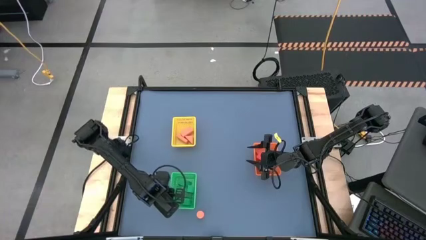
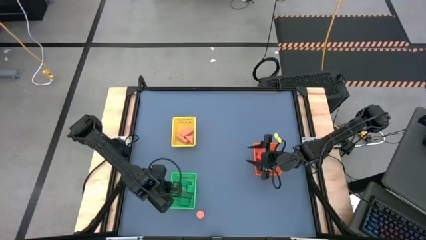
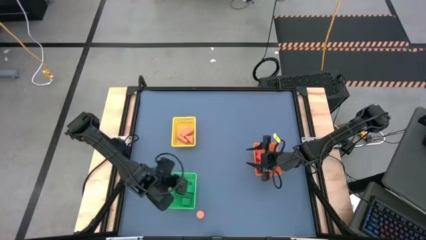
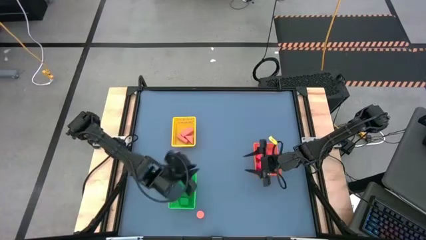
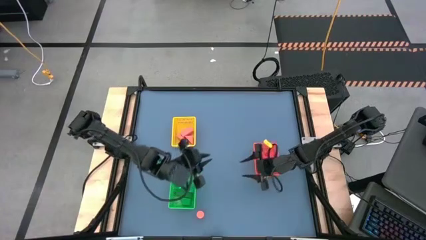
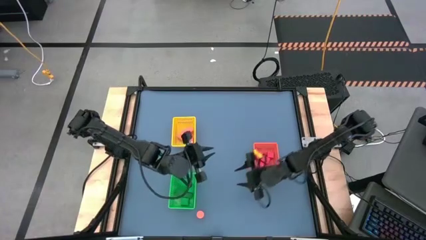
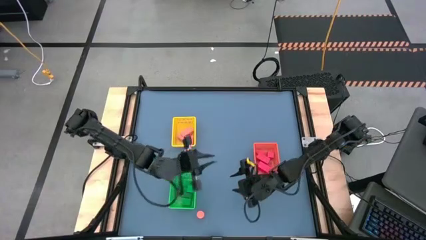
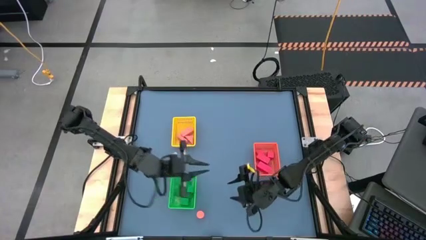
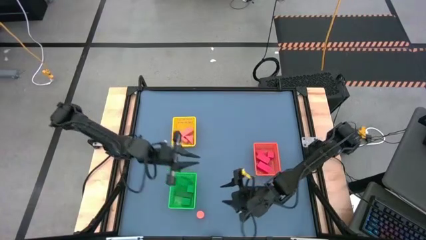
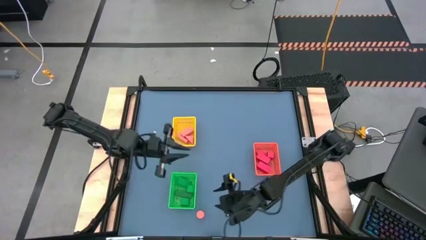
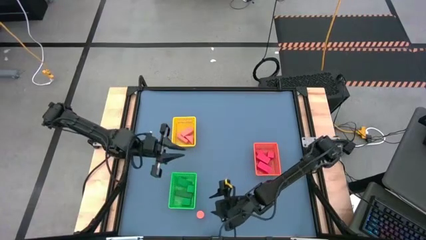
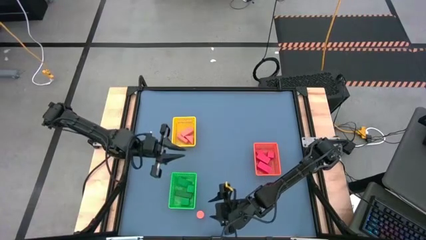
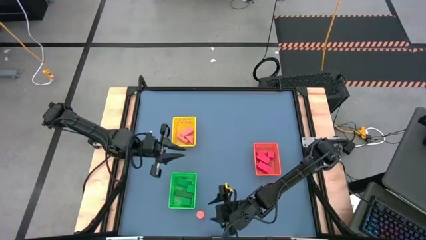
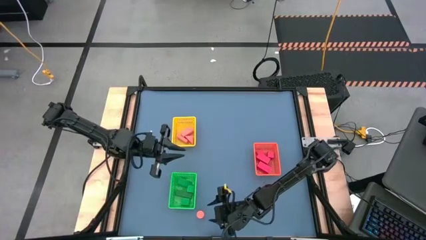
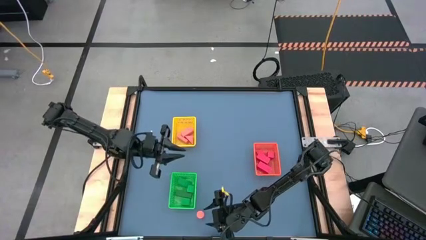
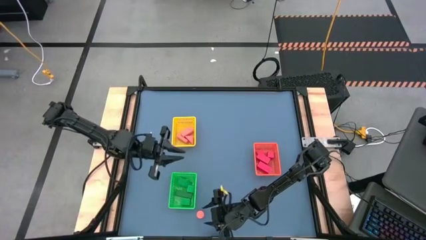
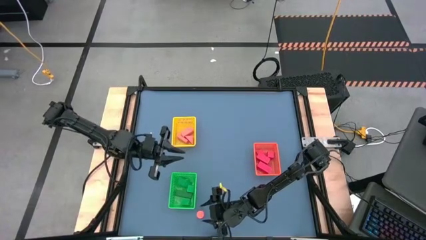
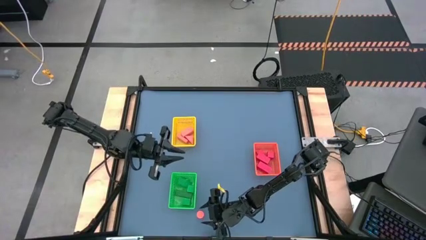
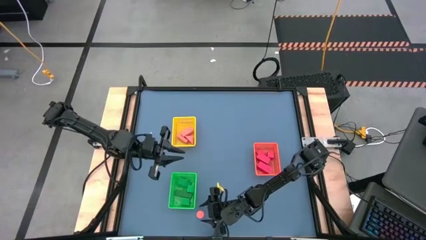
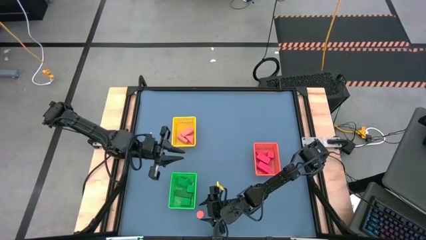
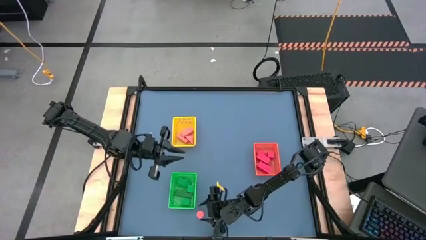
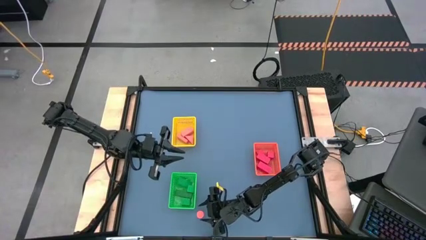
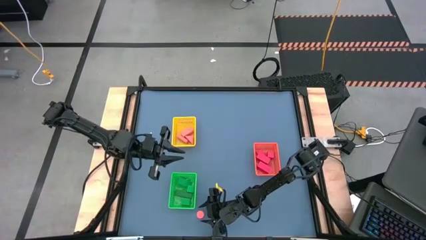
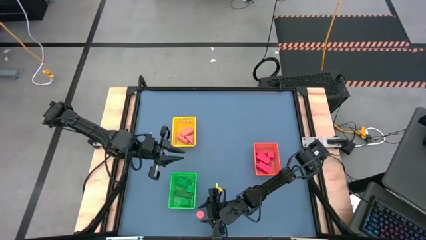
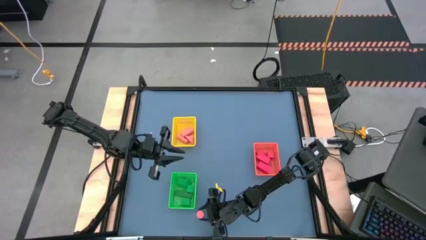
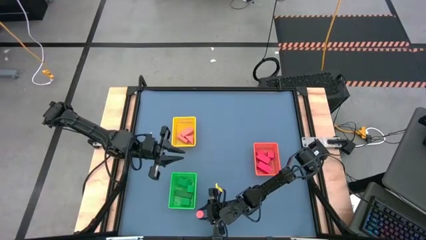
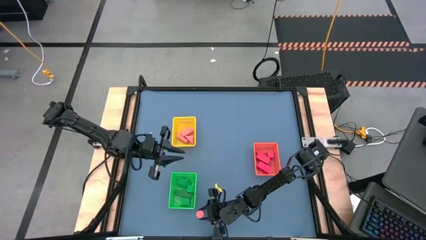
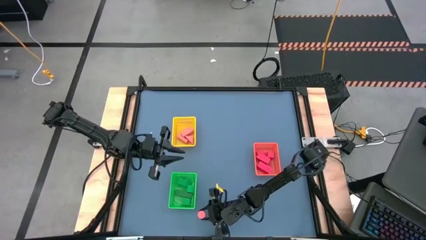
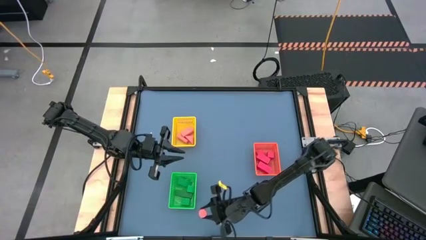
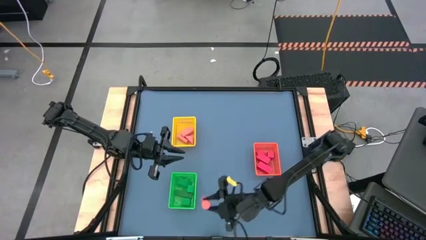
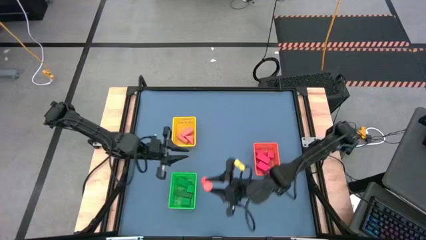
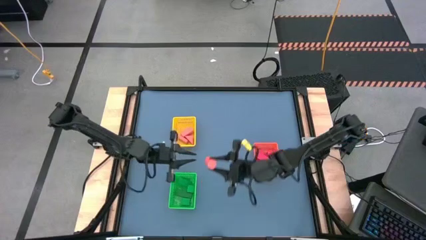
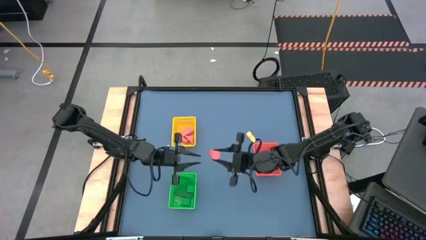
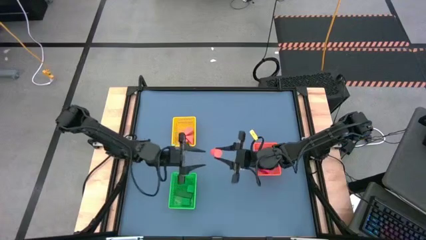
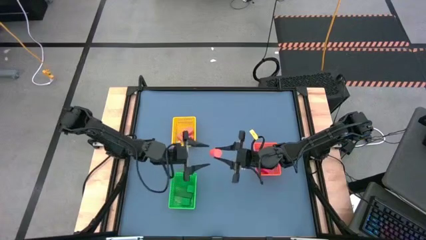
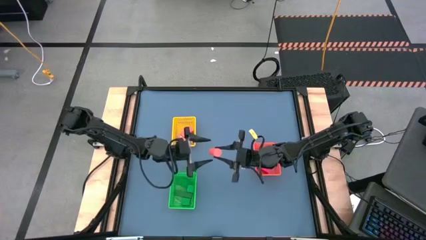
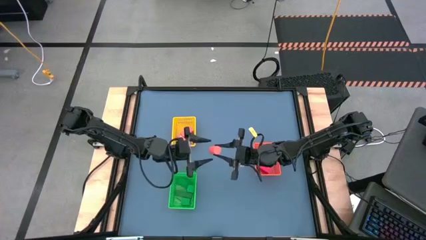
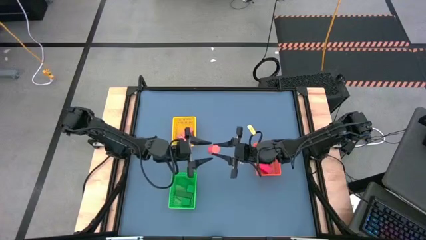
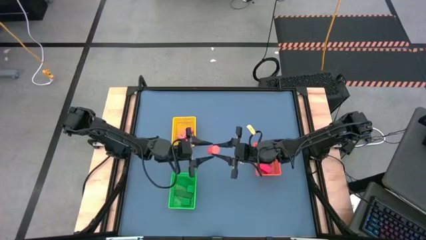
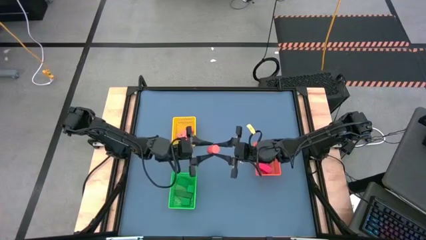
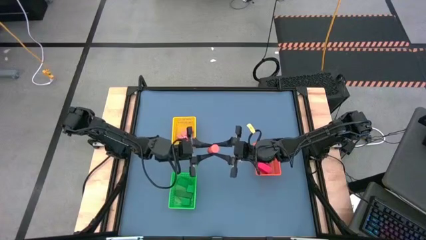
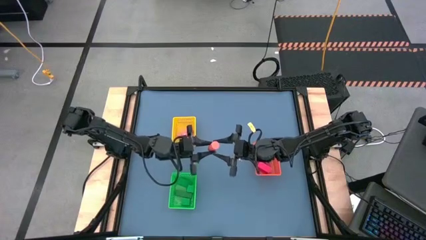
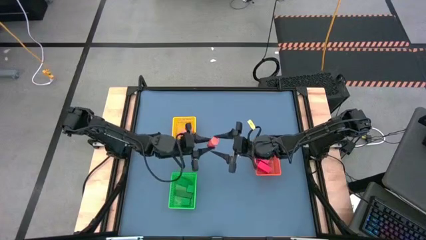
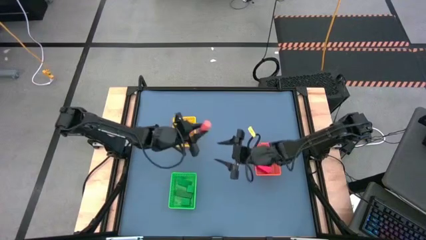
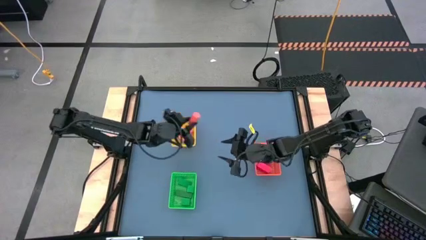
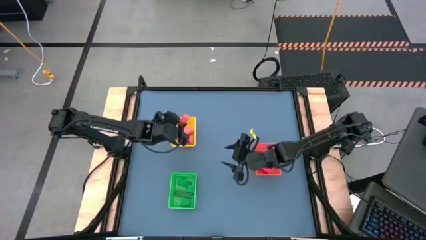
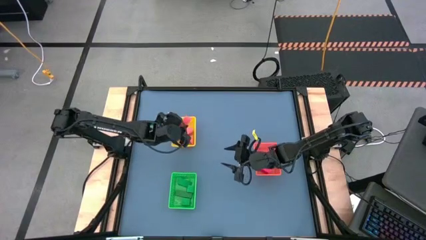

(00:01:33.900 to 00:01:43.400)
Task: Sort & place blocks by color
Put the orange block into the yellow bin

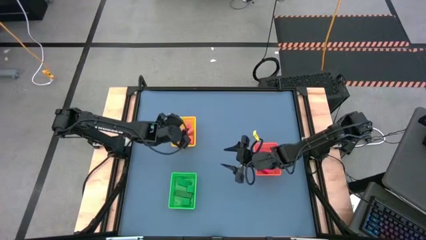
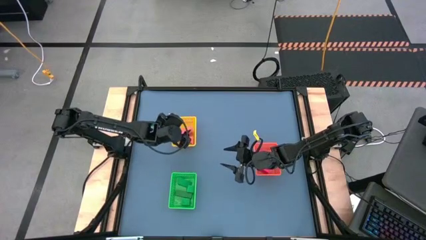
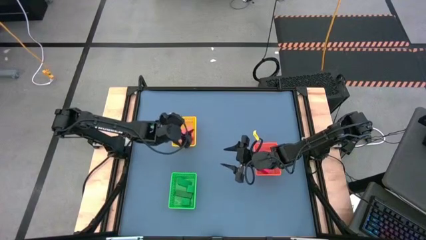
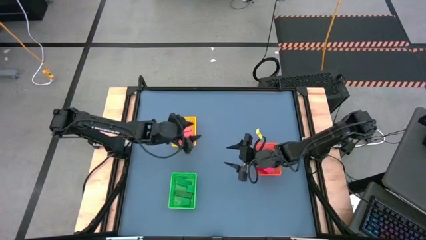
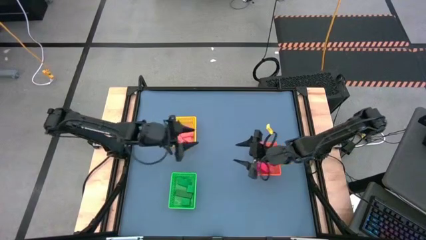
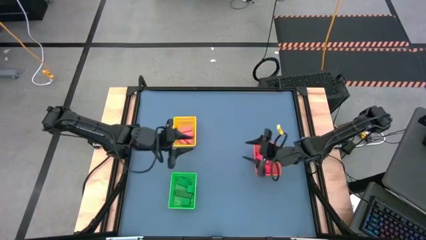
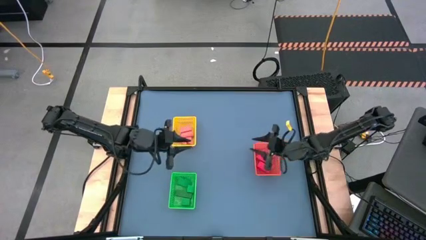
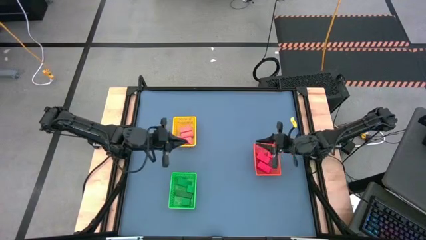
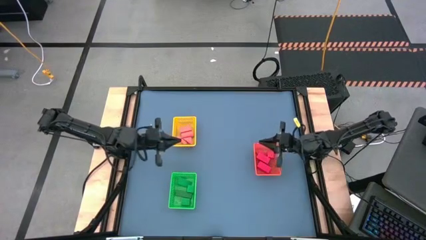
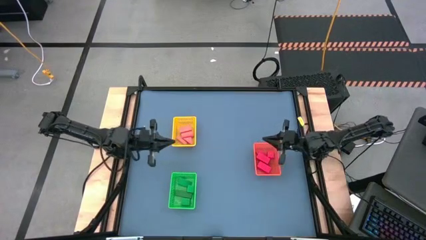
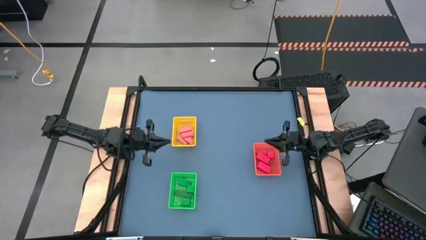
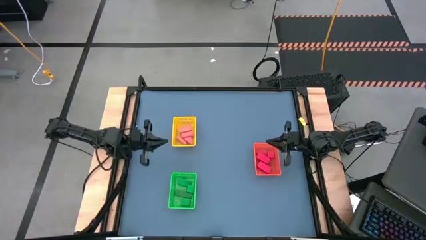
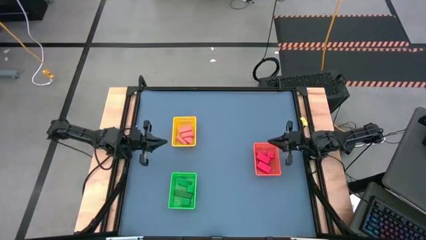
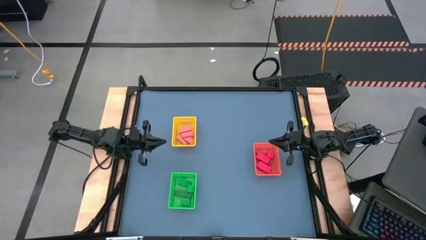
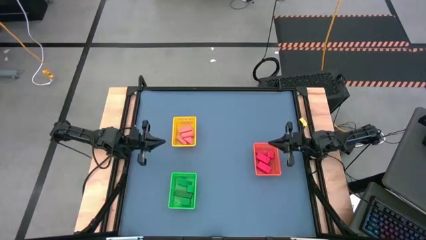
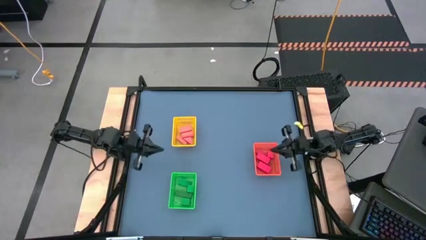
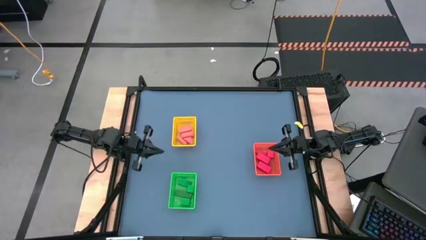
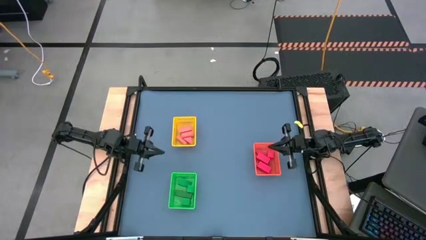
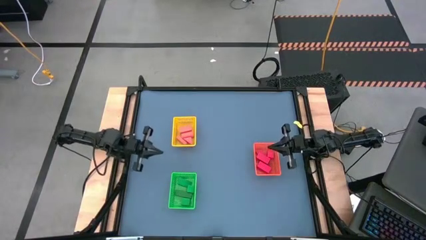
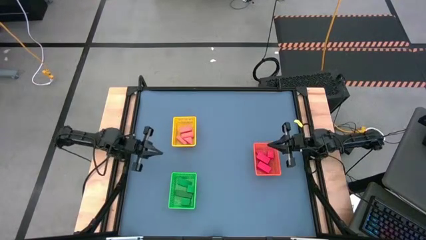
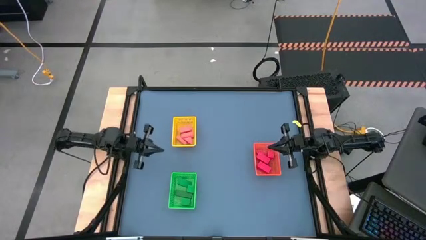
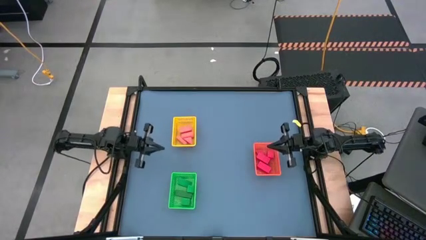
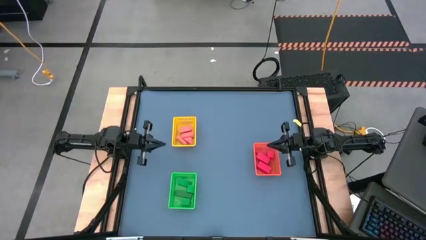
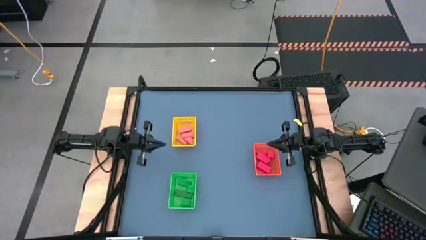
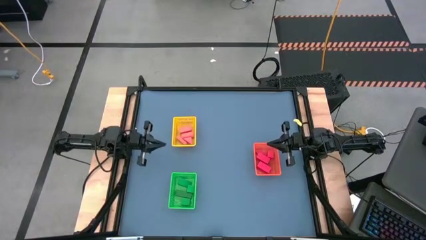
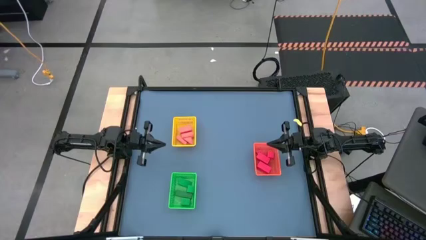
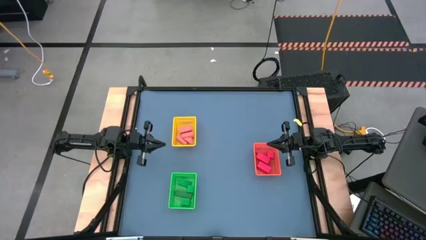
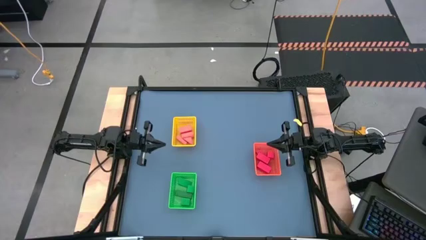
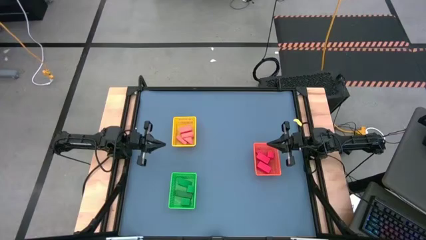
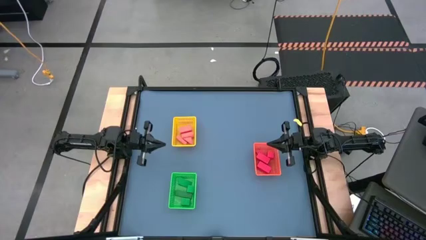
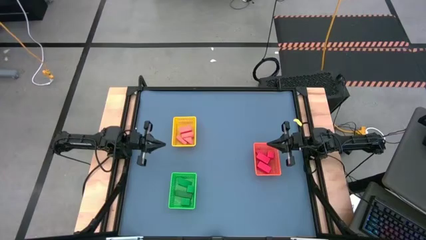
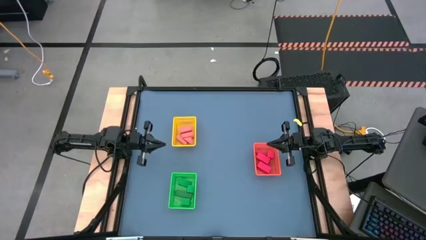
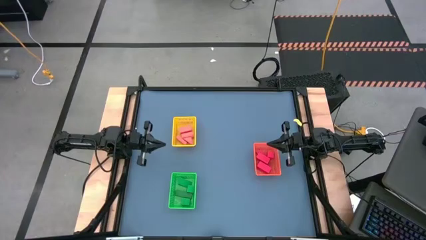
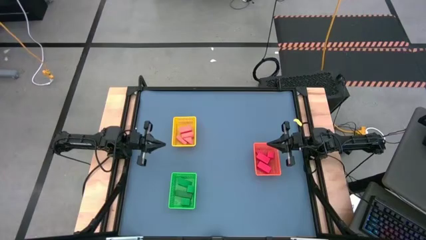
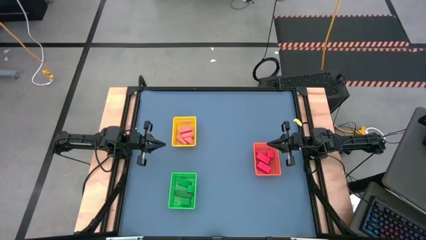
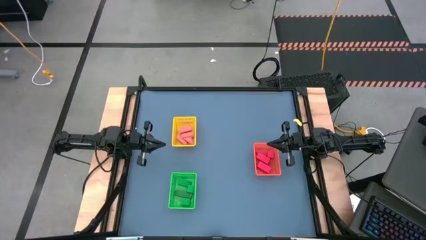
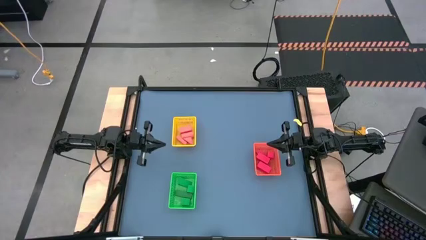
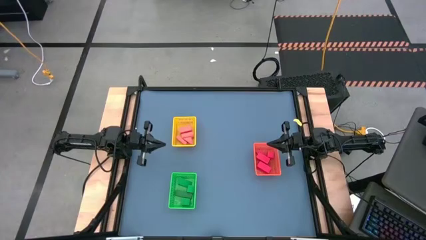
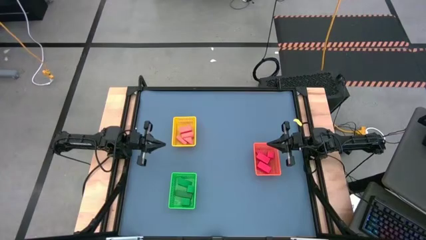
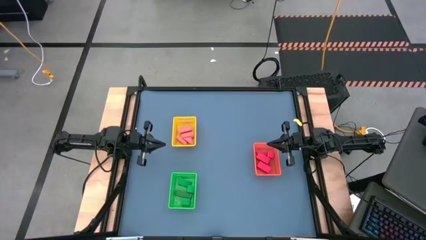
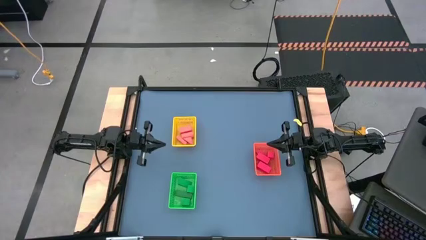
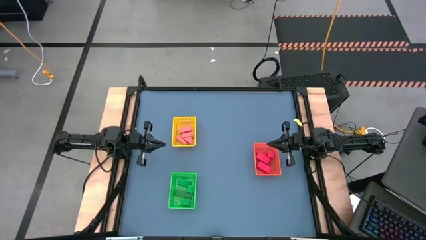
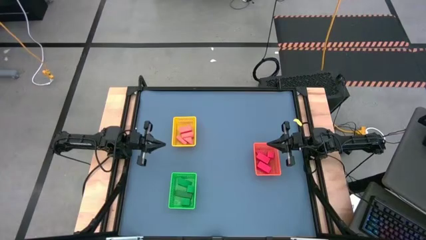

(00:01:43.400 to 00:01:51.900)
Return to Home Position
